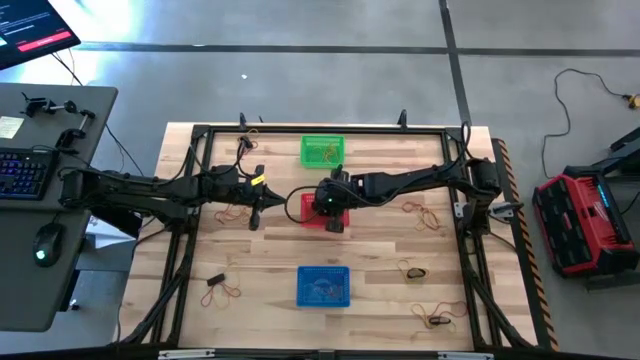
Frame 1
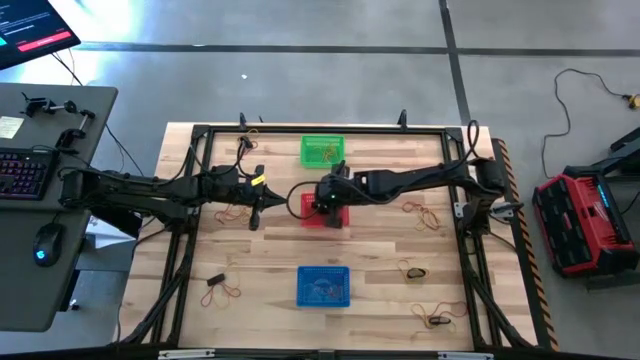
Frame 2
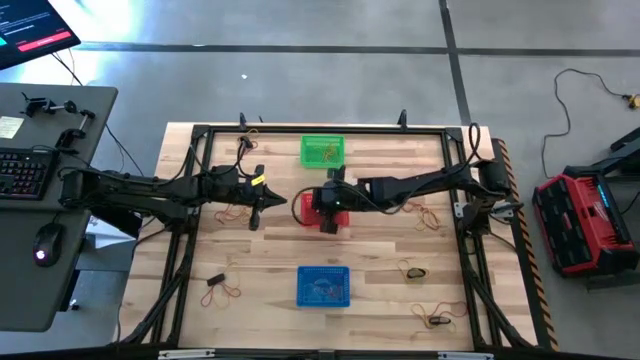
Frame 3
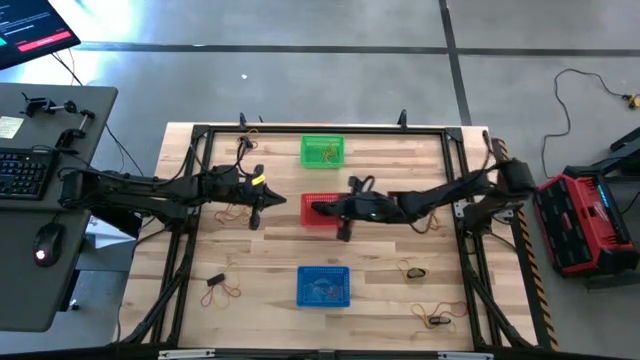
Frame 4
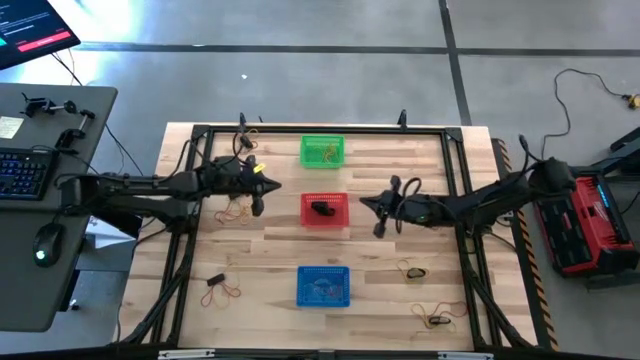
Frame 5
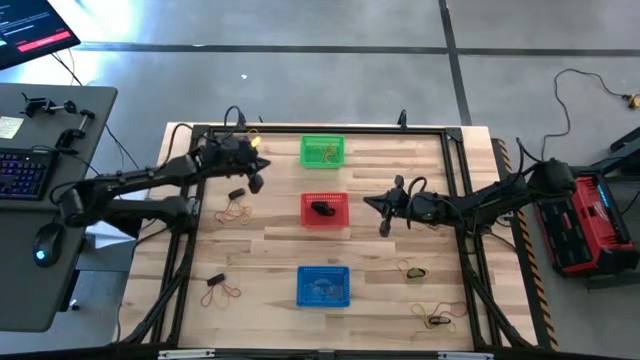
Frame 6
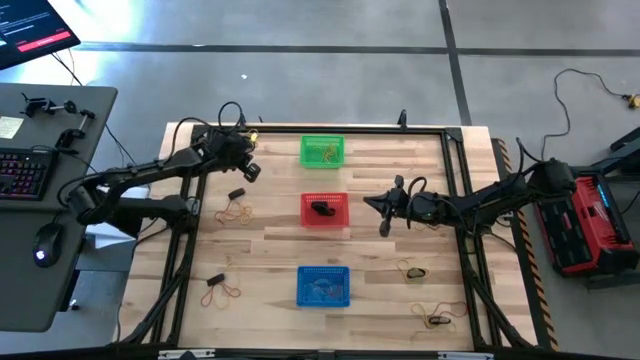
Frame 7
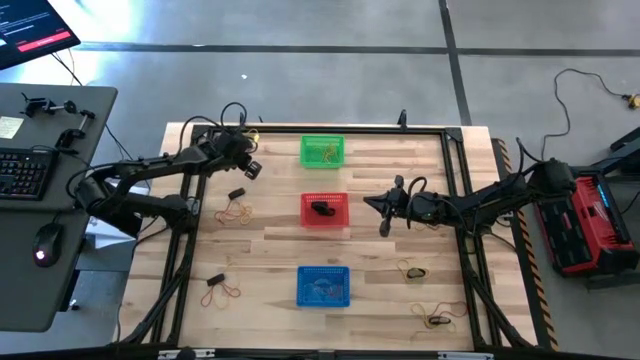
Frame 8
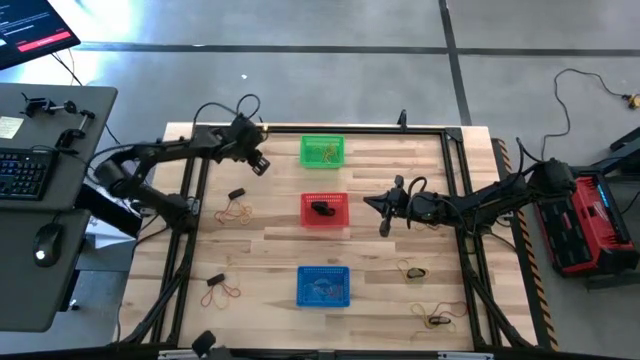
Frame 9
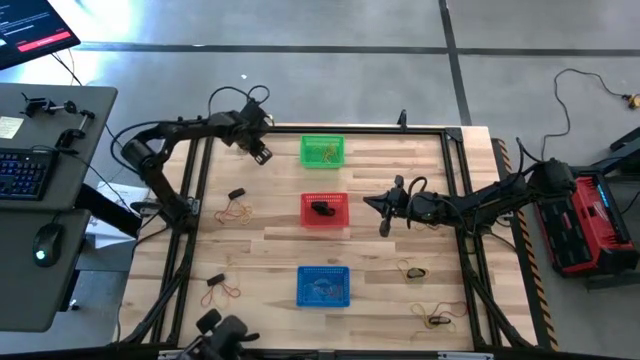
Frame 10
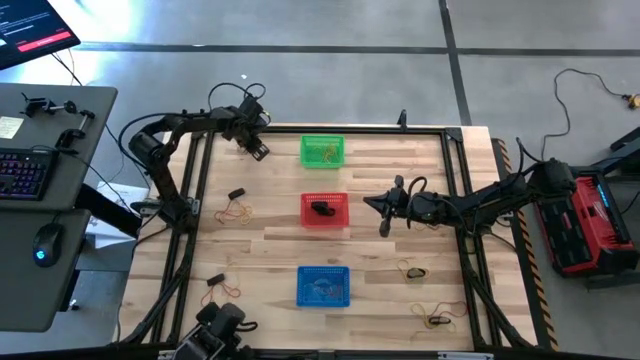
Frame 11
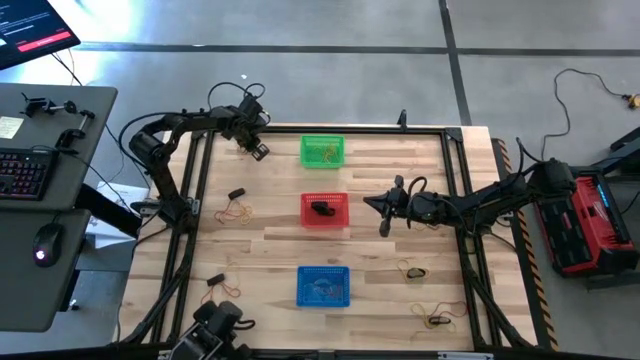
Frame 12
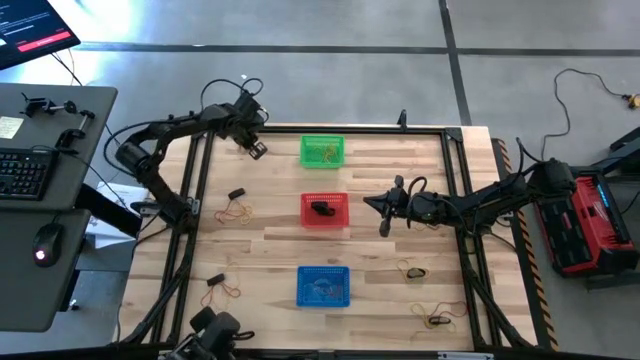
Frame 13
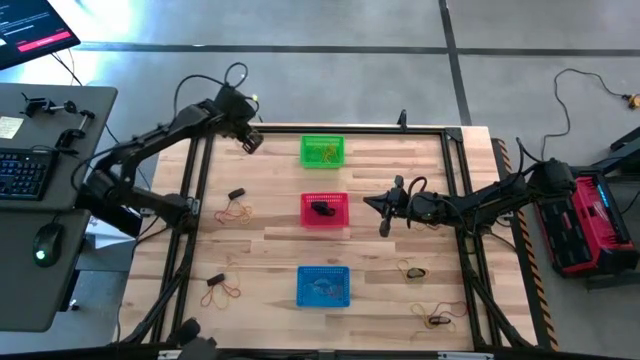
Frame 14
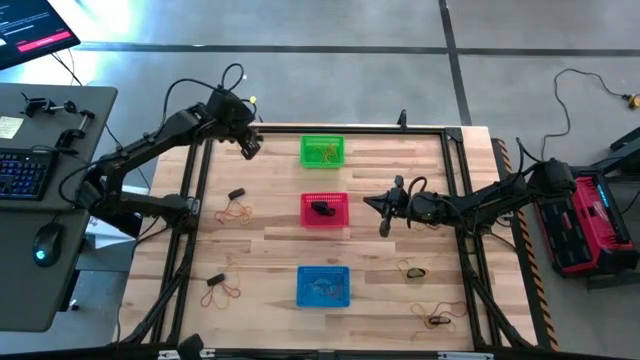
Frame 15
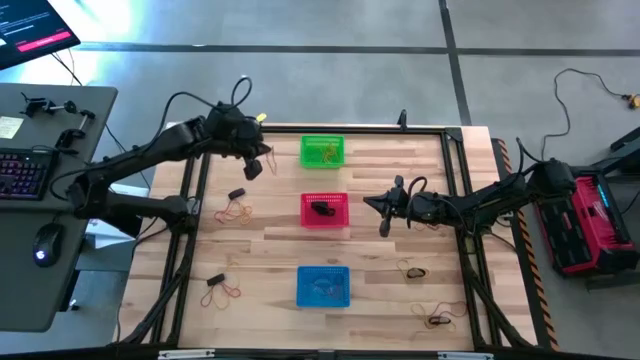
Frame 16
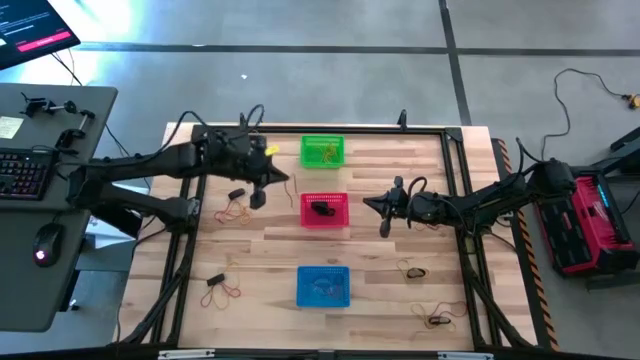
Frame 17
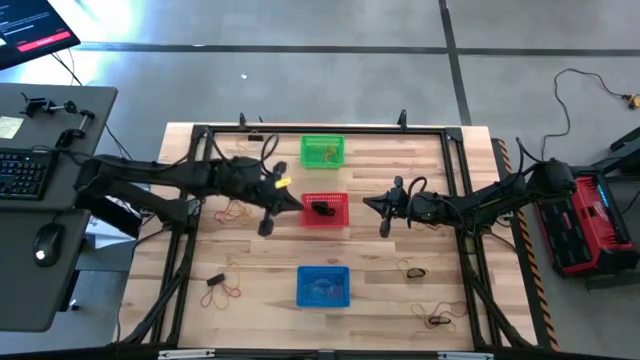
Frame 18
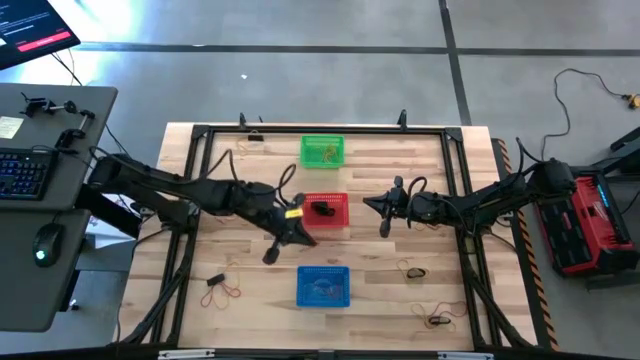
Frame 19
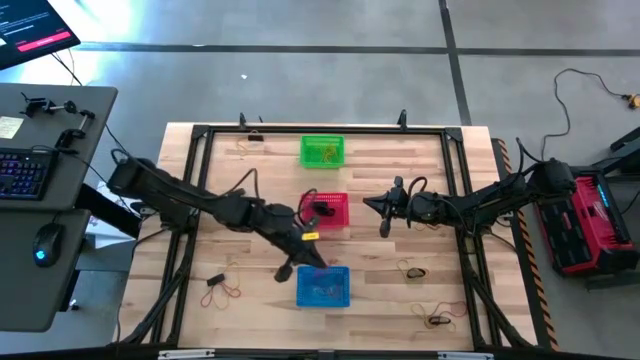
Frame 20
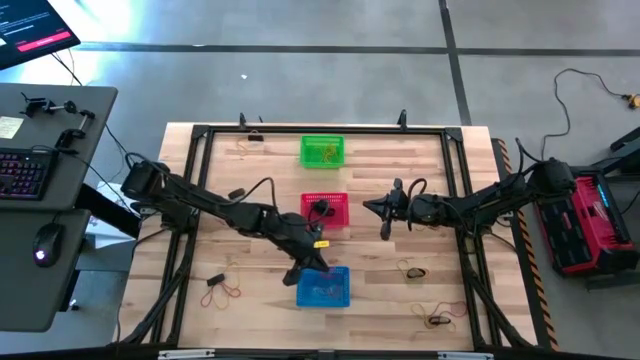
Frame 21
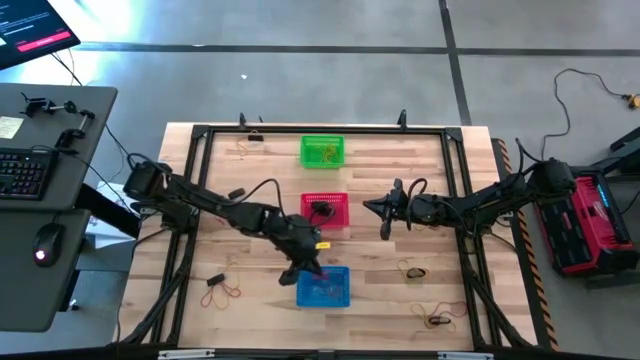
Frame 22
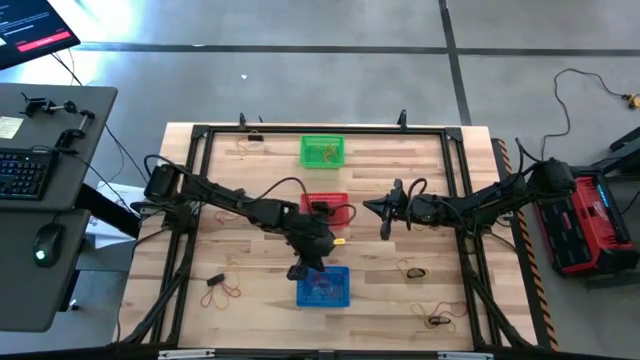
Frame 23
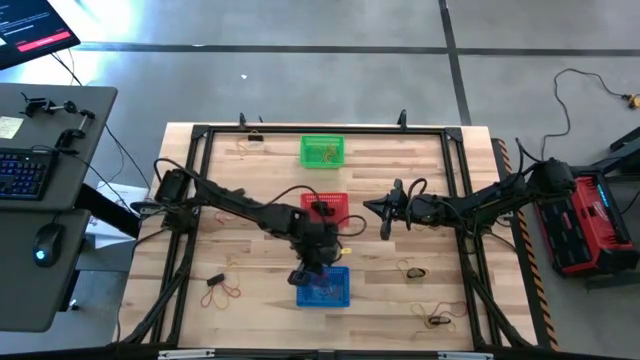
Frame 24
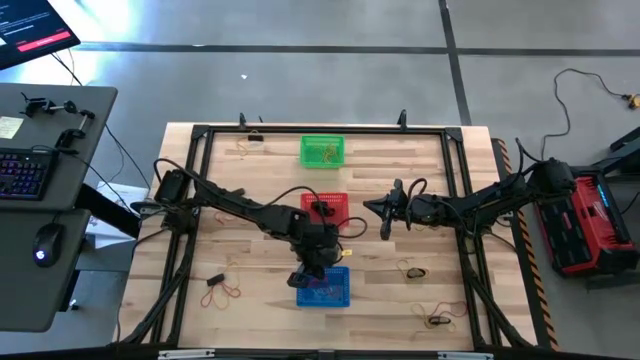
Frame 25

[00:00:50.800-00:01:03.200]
Task: Sort rubber bands into baskets
Put the red rubber band into the blue bin

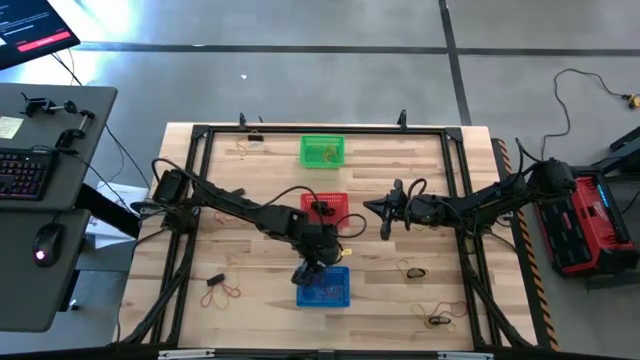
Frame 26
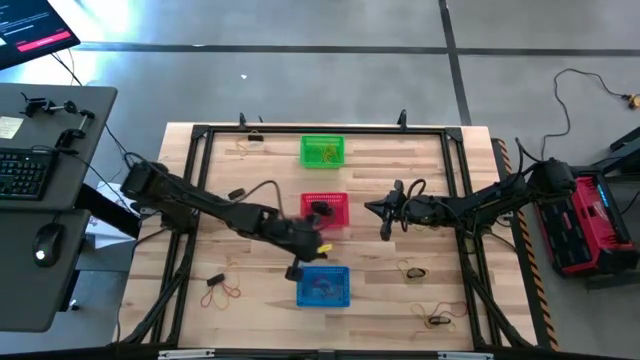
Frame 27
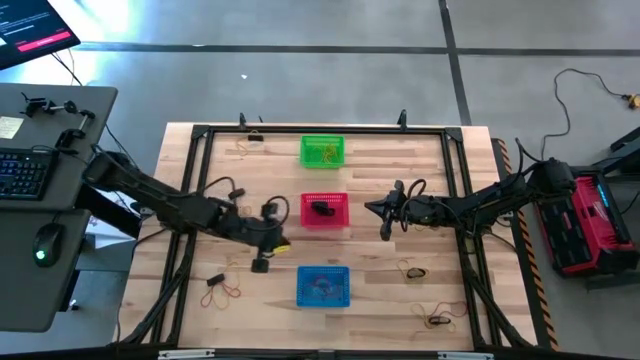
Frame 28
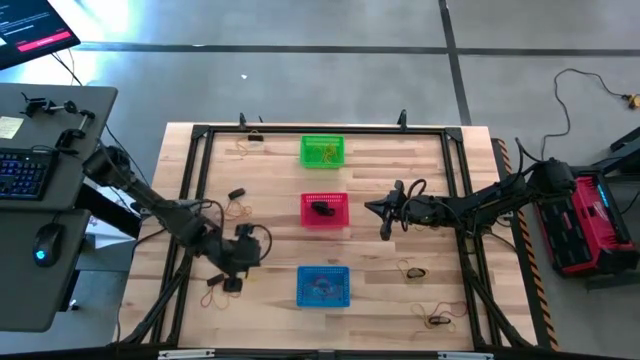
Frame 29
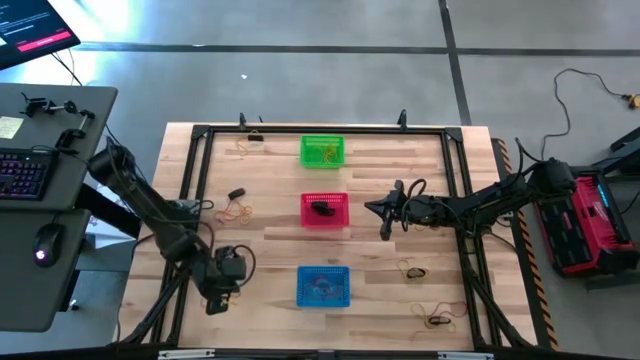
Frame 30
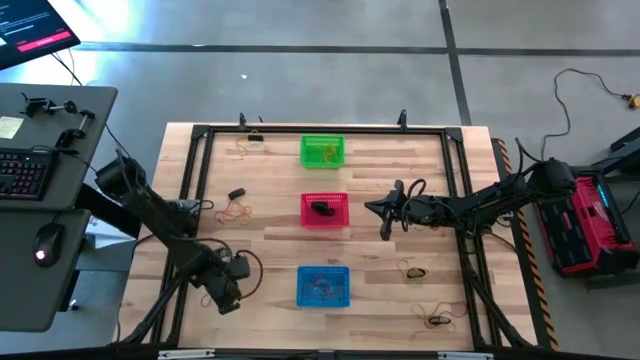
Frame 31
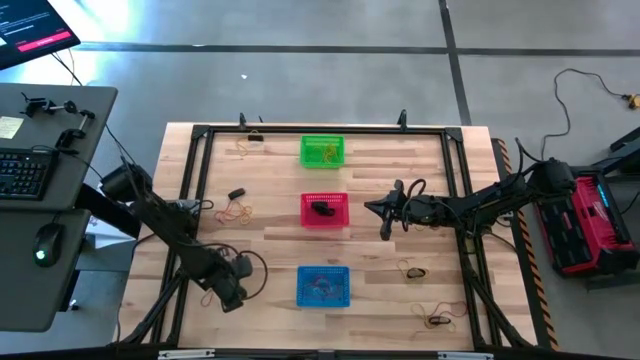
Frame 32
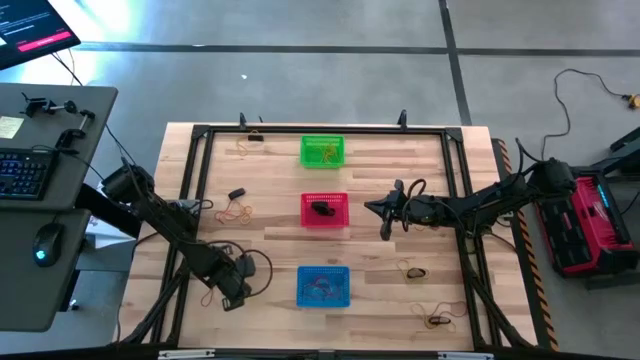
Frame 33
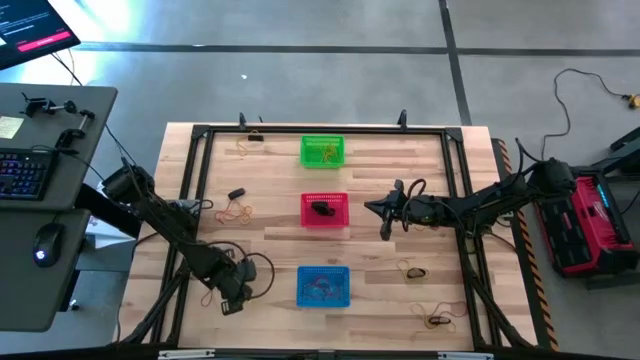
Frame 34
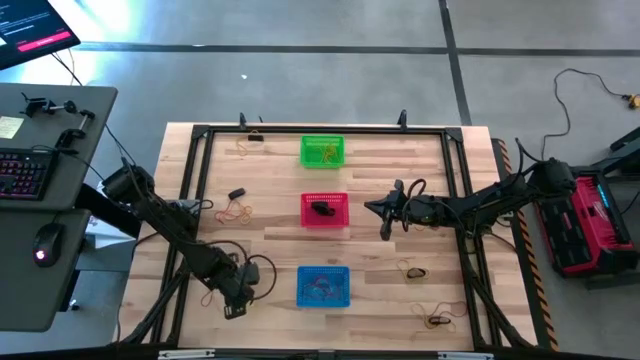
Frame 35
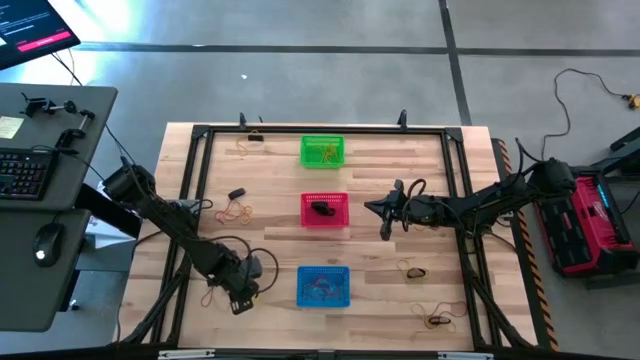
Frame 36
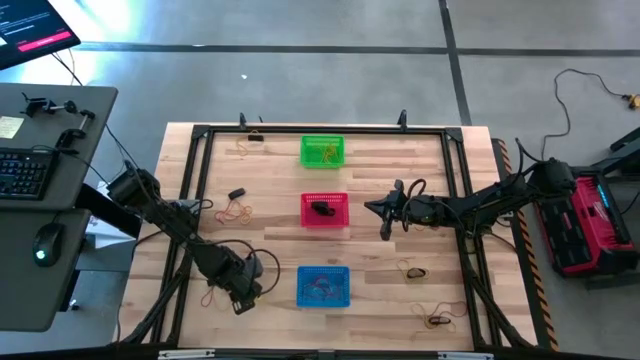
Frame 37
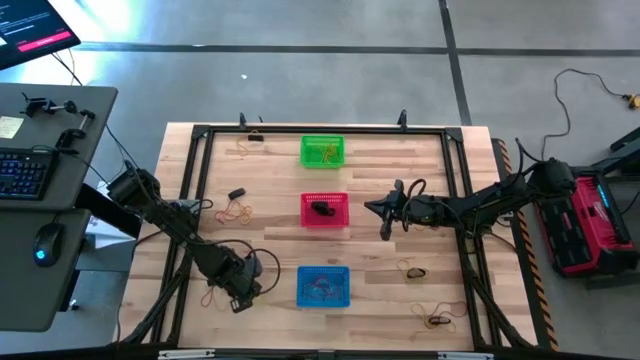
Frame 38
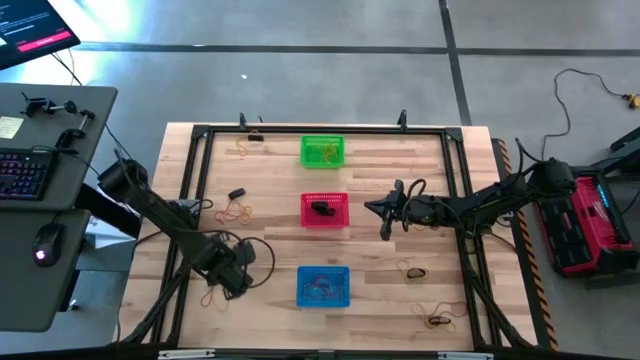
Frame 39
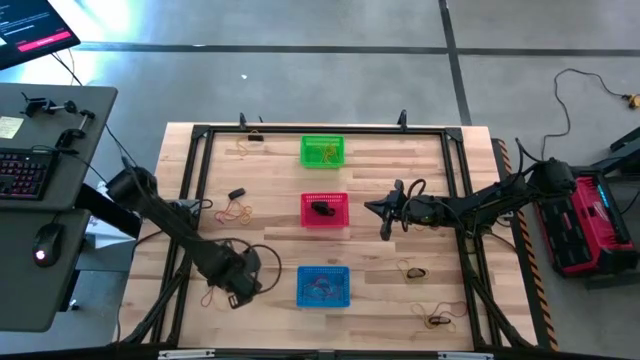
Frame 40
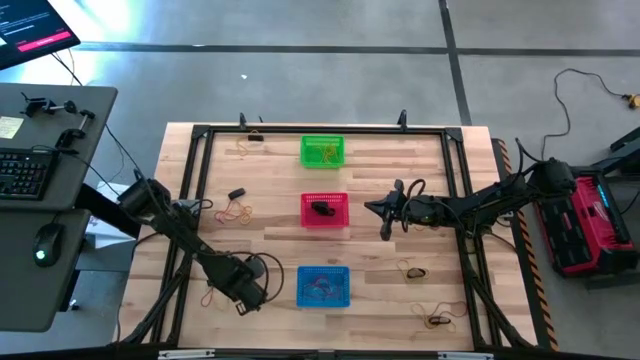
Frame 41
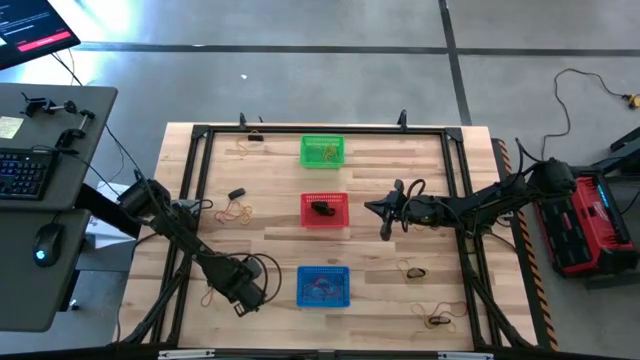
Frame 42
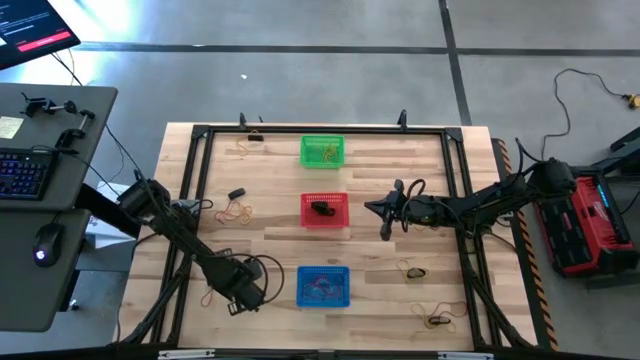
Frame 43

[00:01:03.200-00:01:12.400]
Put the yellow rubber band into the green bin
